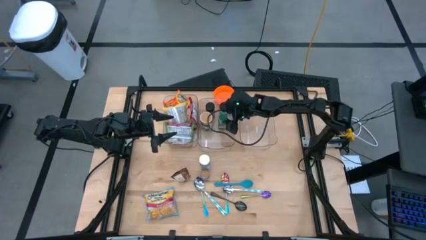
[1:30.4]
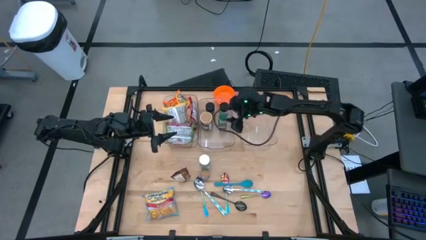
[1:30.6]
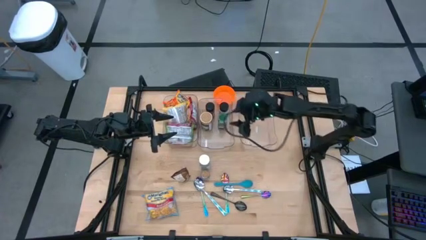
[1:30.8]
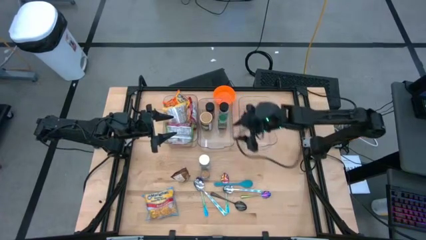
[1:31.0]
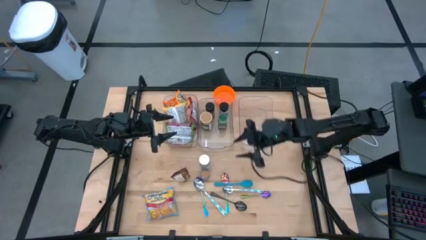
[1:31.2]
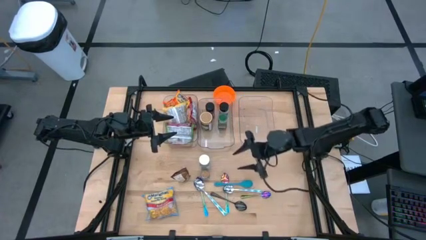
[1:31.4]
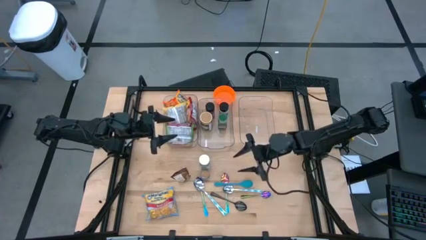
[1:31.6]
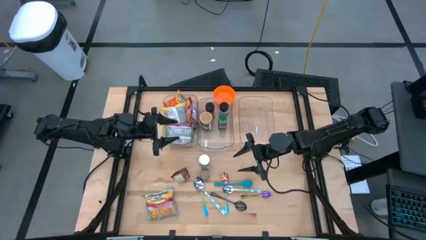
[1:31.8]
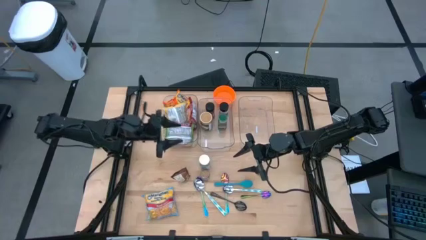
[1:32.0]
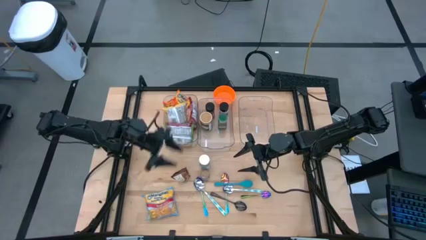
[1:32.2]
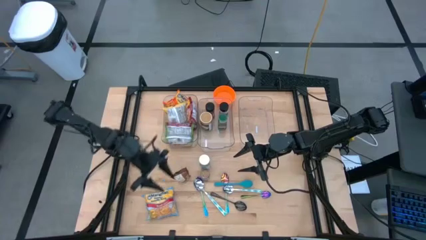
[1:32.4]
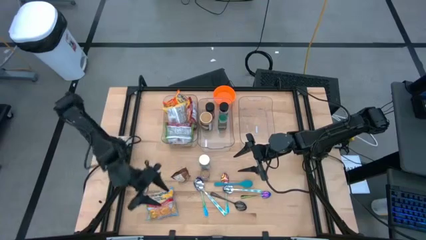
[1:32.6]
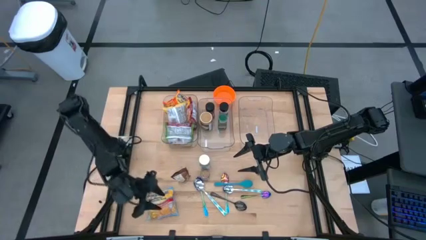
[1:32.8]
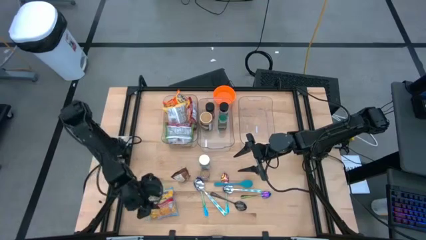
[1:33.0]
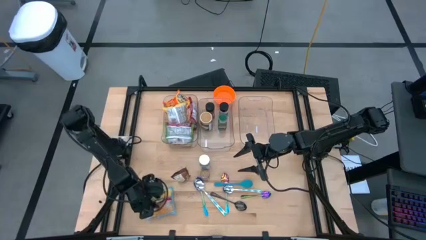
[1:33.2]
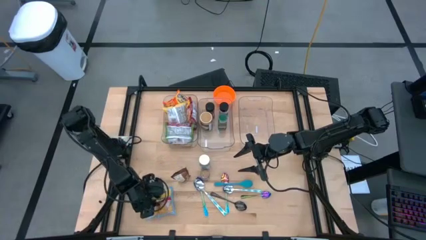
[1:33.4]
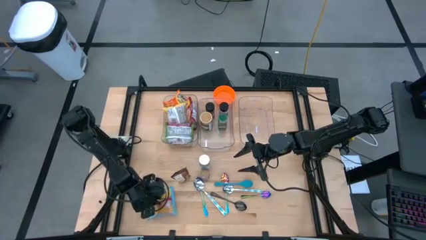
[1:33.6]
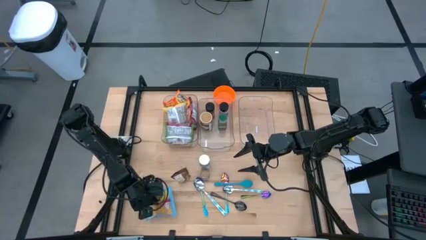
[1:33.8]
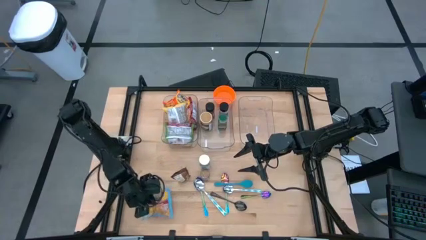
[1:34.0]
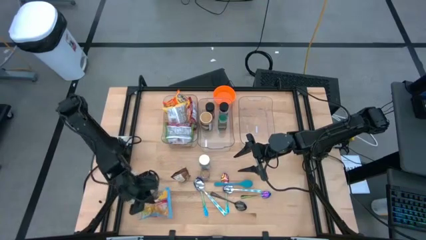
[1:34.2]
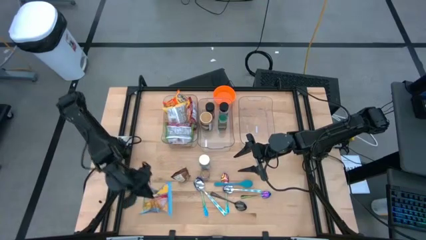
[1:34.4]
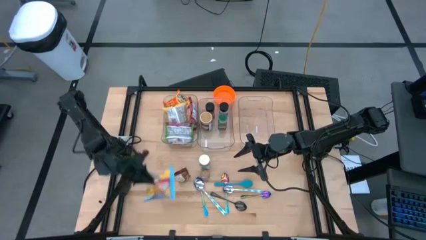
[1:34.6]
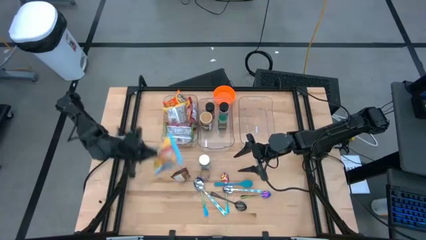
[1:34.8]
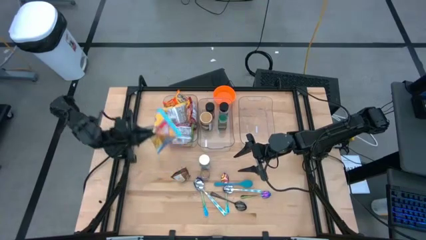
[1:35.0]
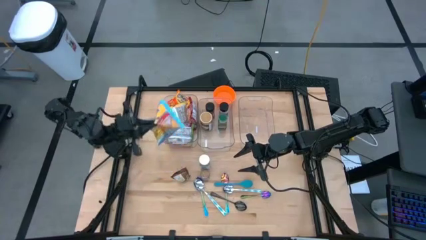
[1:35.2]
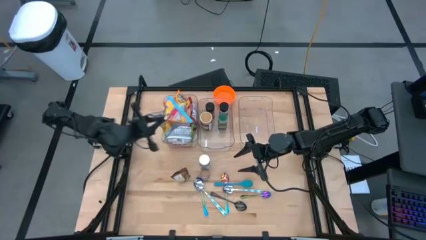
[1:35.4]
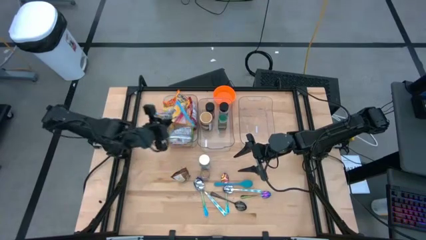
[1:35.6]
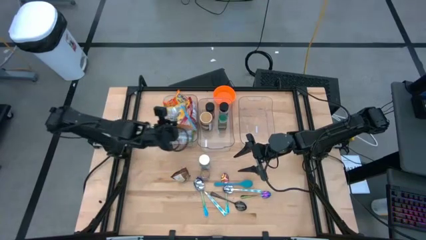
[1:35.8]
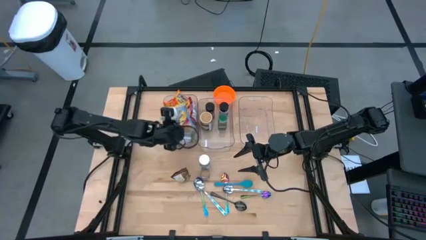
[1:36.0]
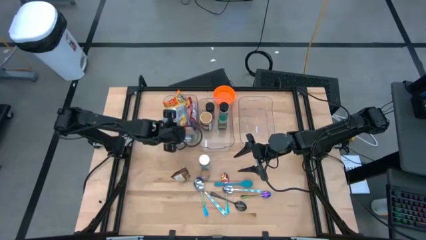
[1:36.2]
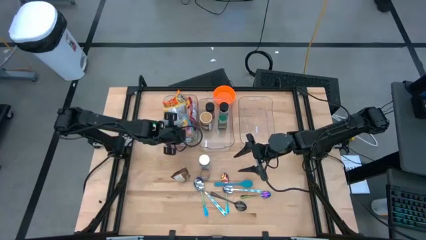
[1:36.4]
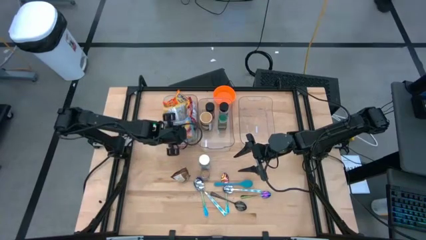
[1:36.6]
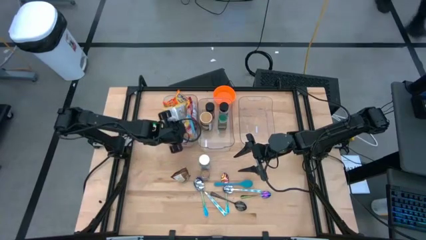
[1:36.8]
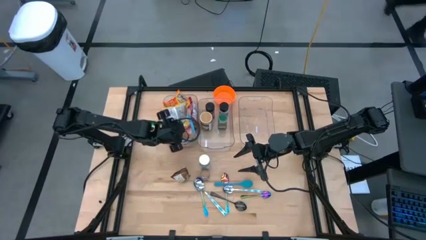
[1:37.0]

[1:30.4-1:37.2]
Task: Pick & Place Food Item
Put the blue noodle pack into the left transparent bin

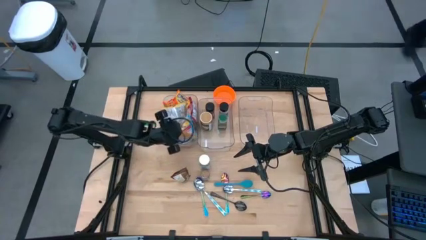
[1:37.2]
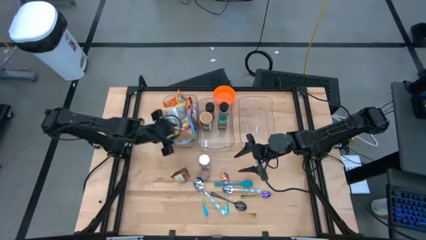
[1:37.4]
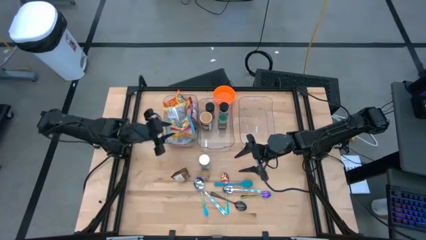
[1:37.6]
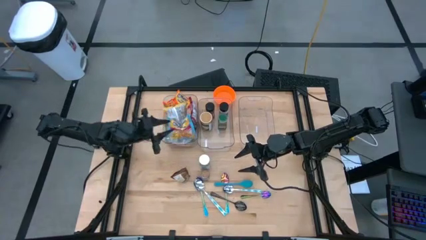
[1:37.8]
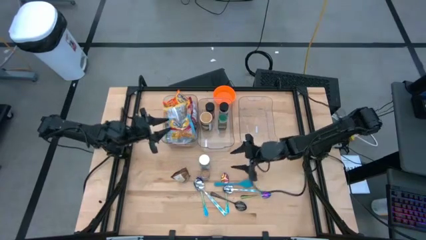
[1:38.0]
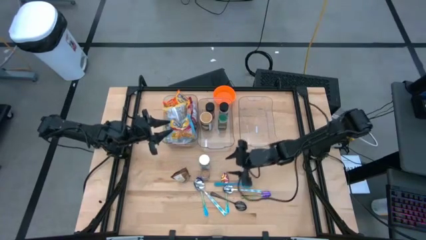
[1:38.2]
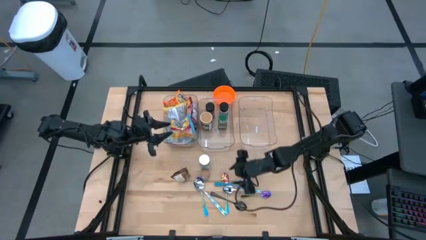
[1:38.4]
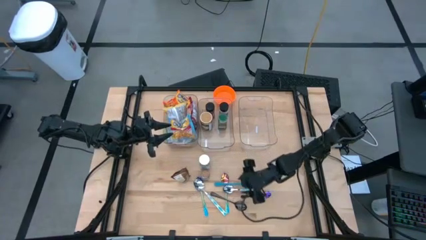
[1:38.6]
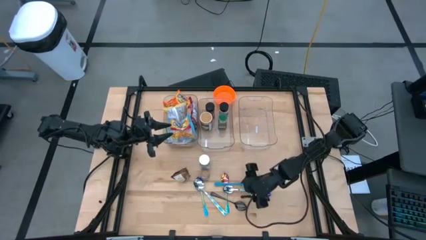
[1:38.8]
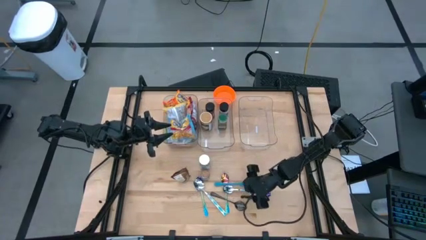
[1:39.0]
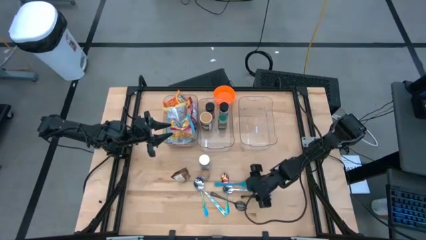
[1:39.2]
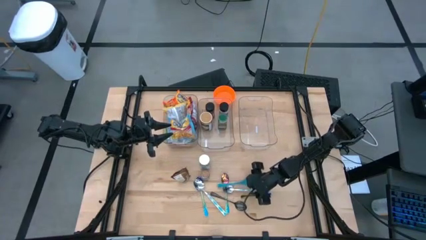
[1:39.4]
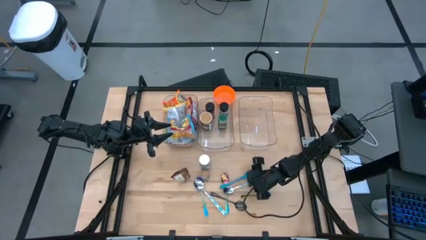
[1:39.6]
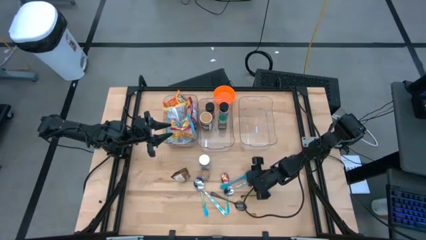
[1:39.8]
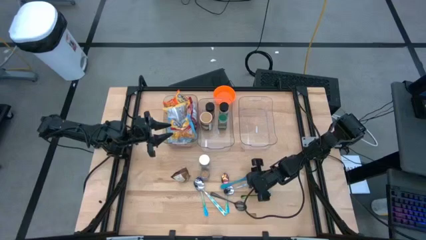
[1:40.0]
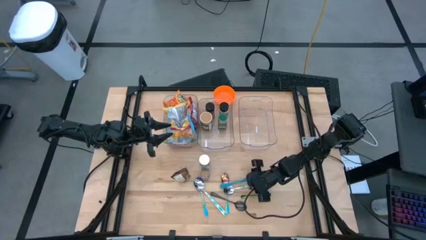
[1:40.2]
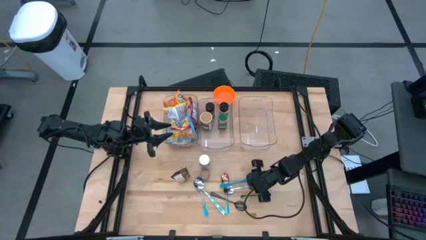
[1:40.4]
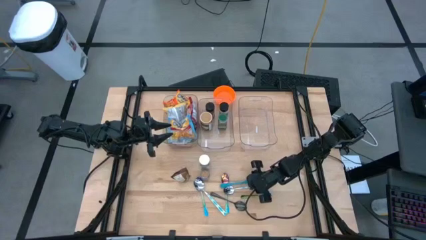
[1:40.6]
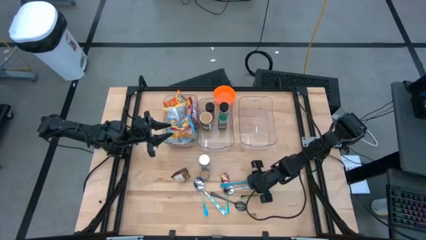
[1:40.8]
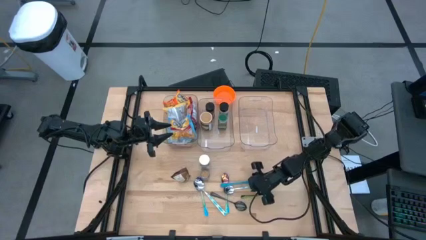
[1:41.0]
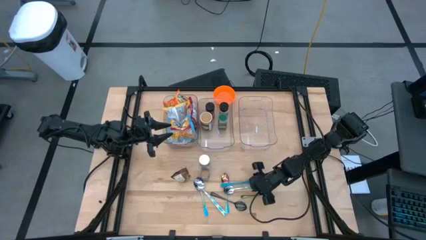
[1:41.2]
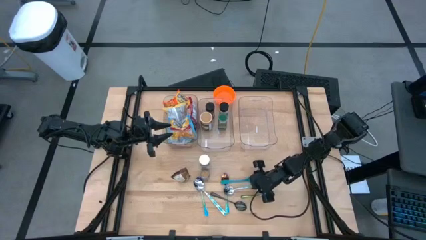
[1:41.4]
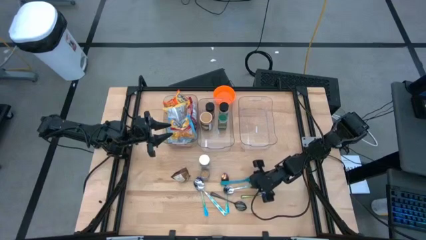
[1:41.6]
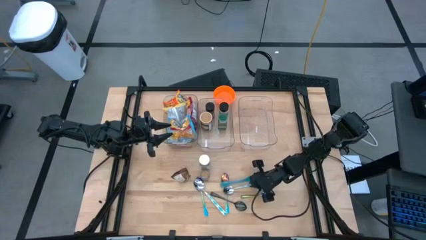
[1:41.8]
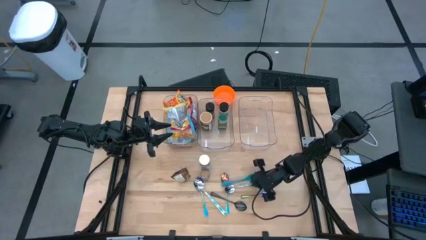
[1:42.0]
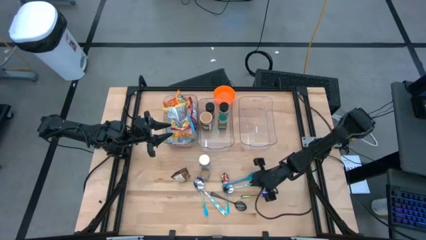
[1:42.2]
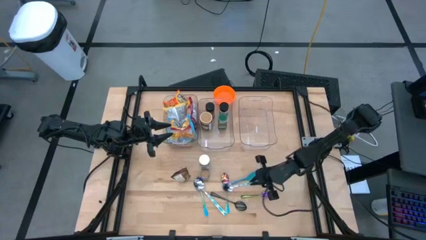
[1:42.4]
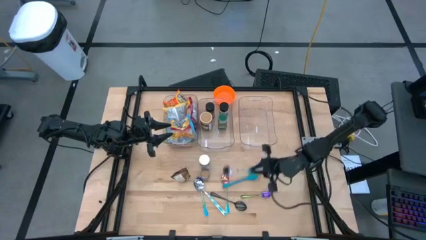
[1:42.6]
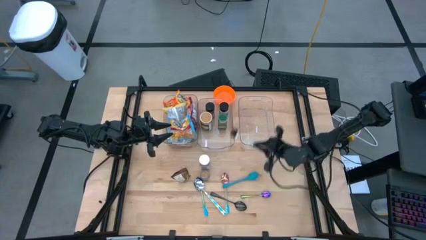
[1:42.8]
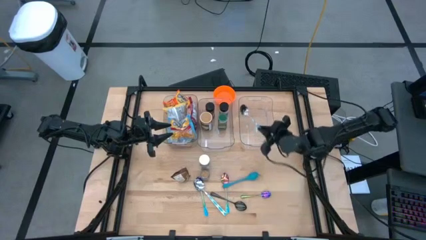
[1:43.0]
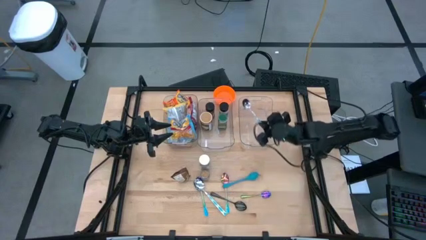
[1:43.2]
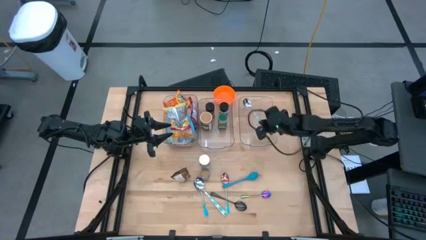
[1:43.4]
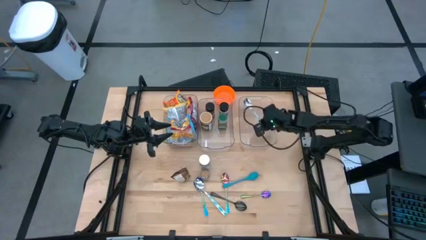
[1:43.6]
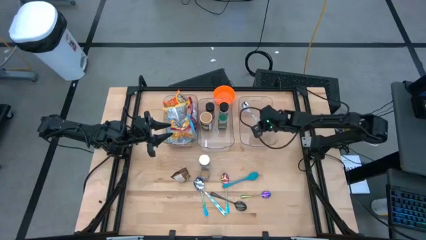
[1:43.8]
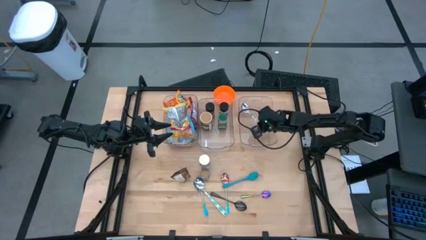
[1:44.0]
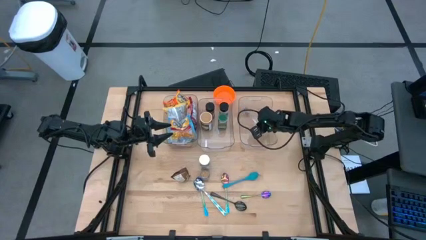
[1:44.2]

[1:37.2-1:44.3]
Put the right patterned spoon into the right transparent bin
